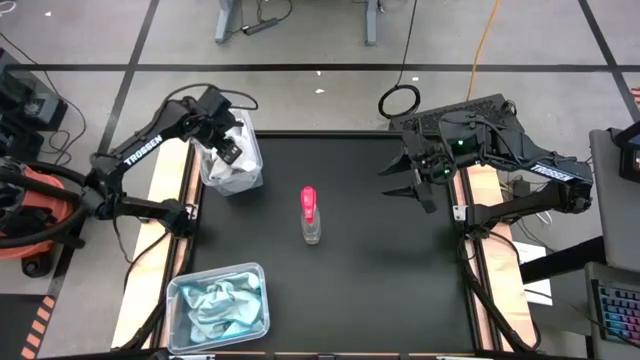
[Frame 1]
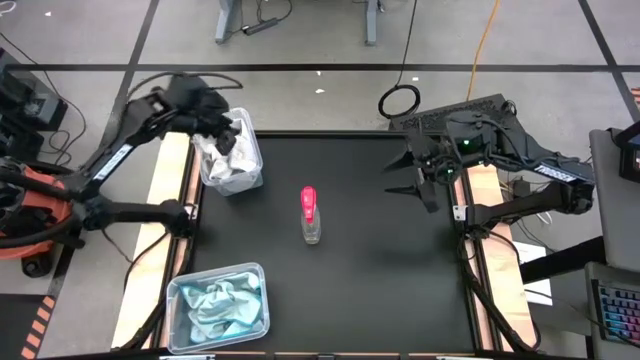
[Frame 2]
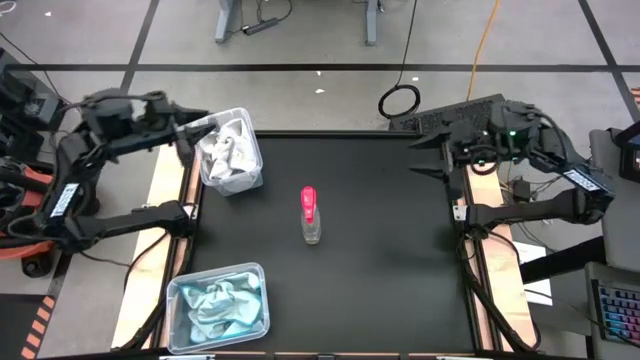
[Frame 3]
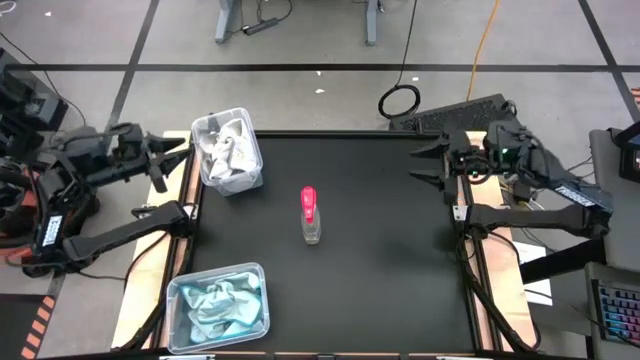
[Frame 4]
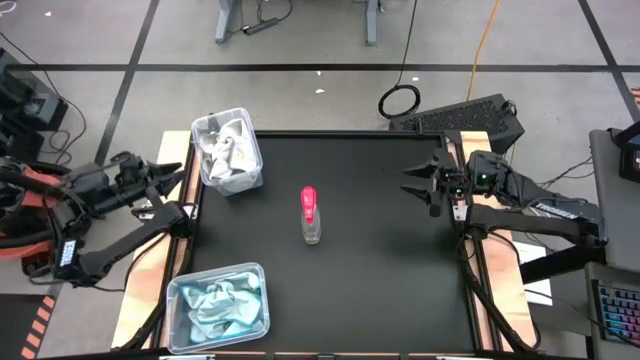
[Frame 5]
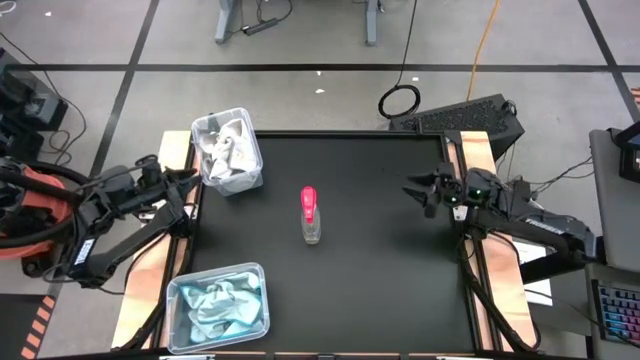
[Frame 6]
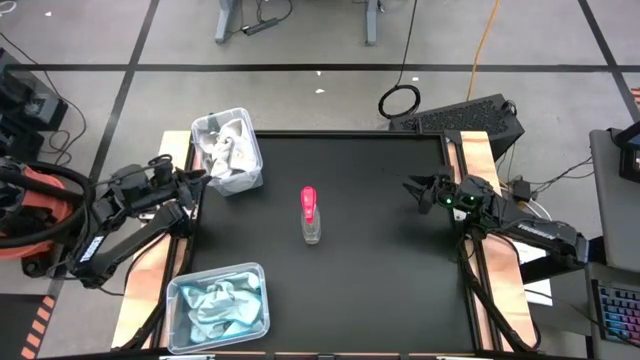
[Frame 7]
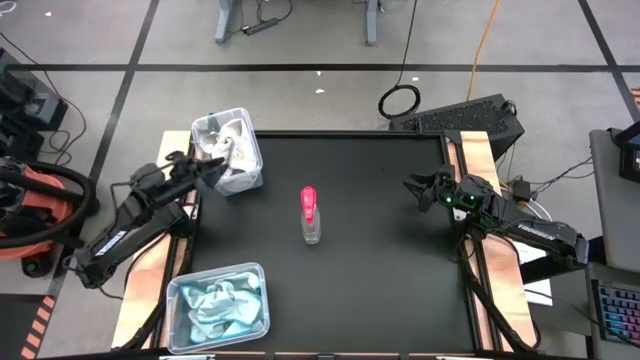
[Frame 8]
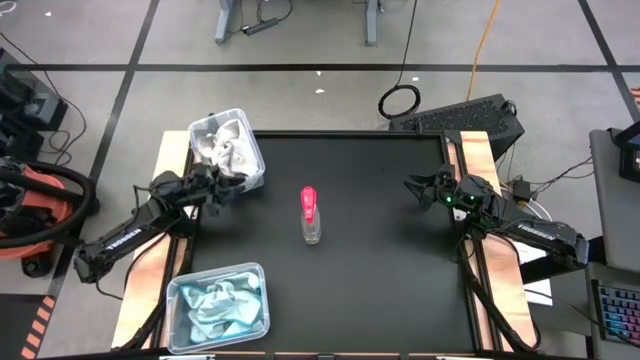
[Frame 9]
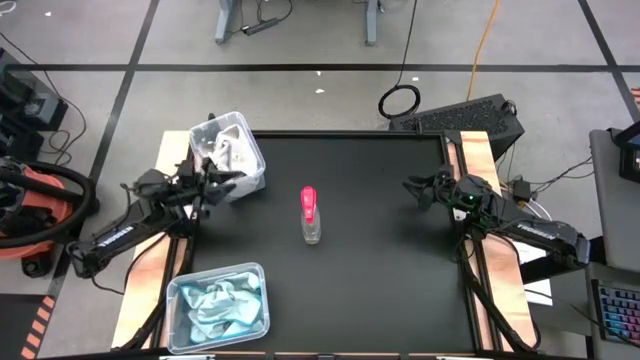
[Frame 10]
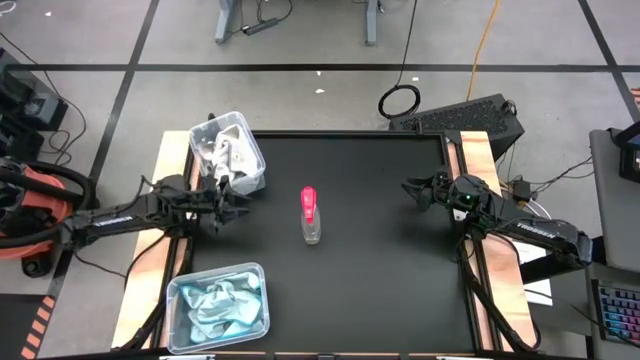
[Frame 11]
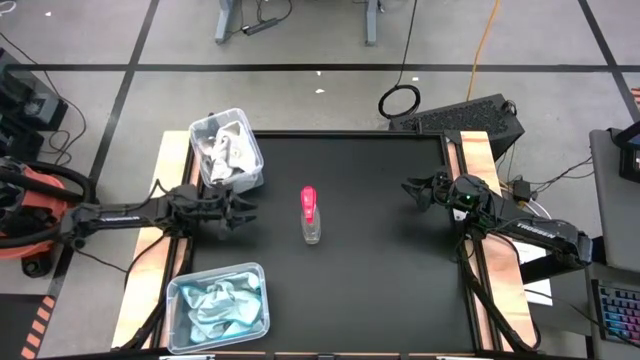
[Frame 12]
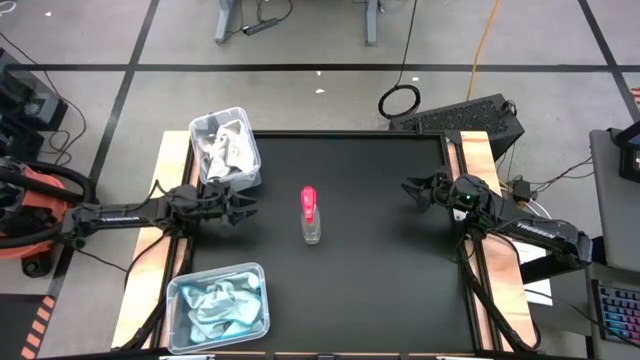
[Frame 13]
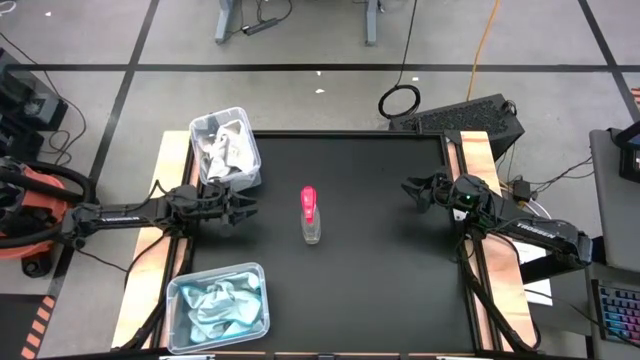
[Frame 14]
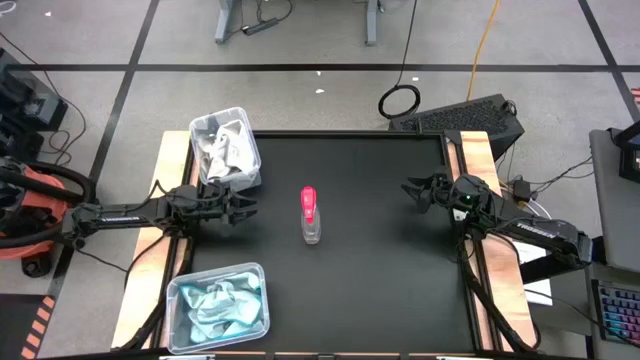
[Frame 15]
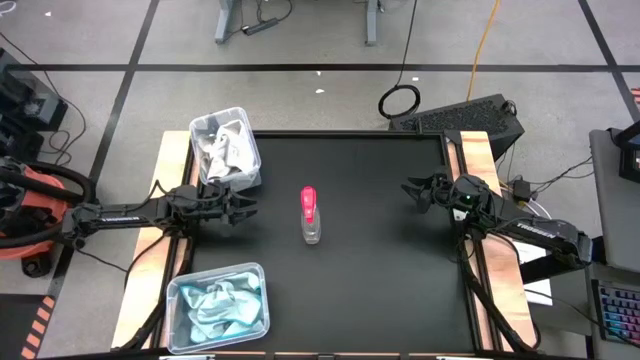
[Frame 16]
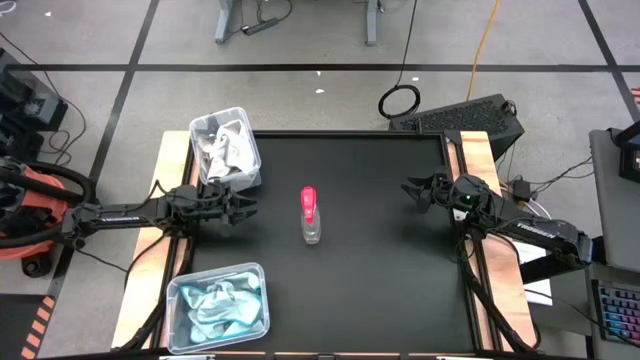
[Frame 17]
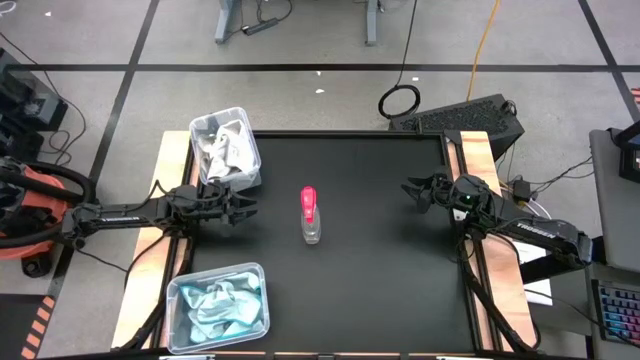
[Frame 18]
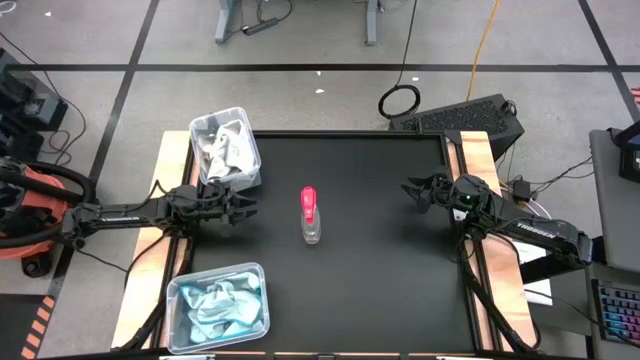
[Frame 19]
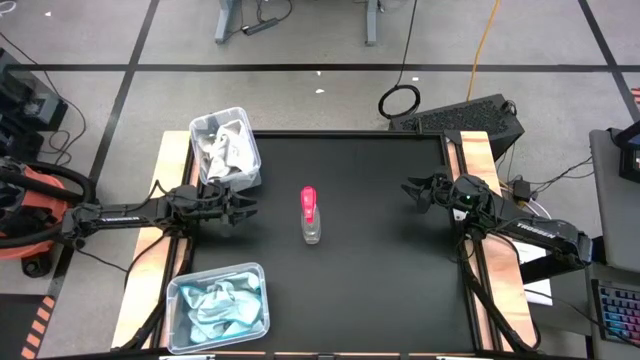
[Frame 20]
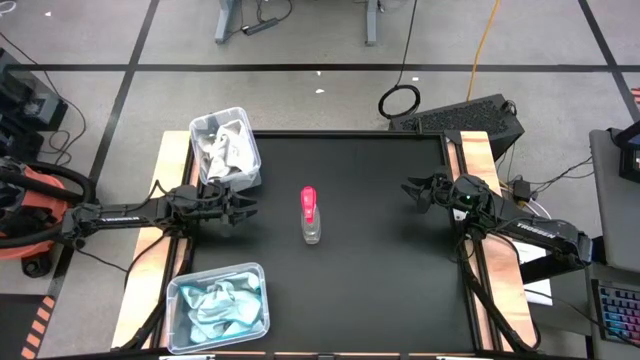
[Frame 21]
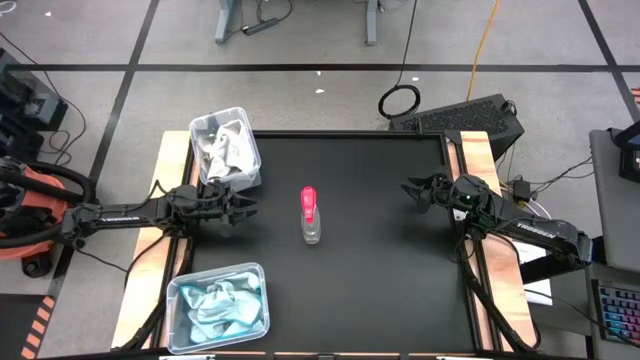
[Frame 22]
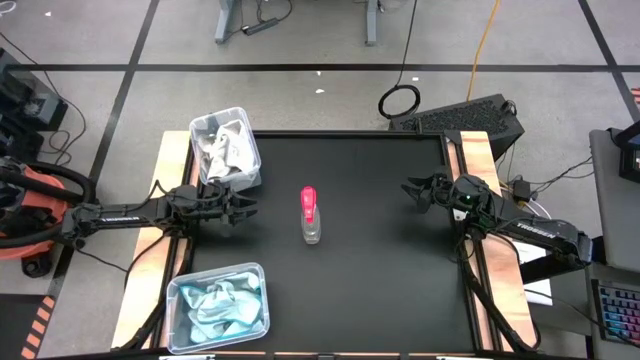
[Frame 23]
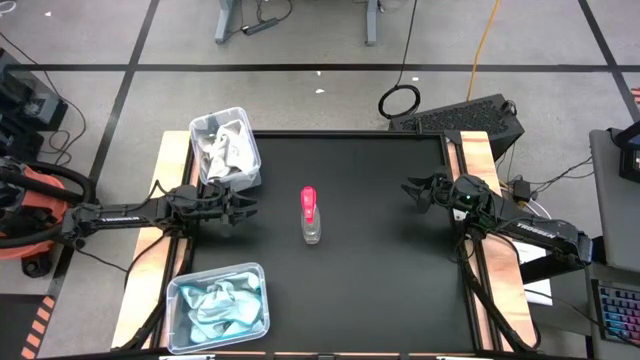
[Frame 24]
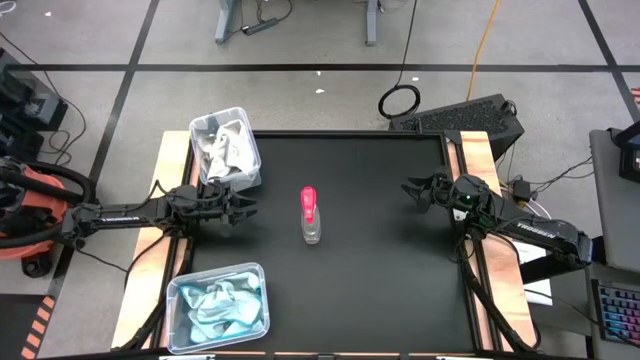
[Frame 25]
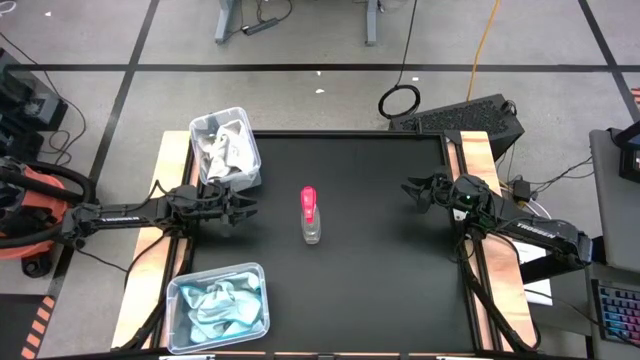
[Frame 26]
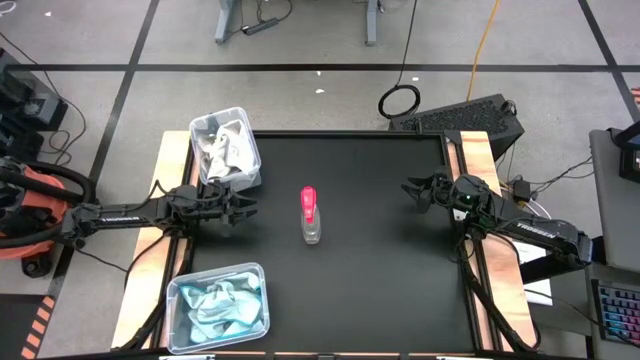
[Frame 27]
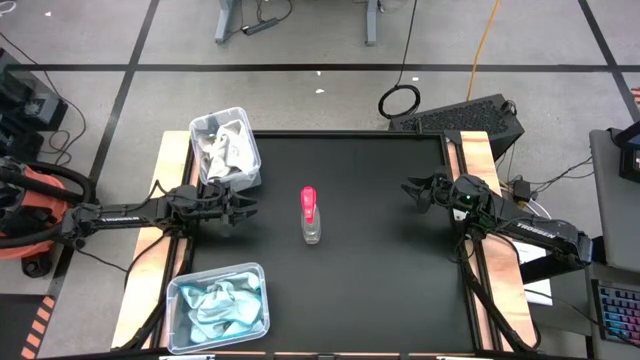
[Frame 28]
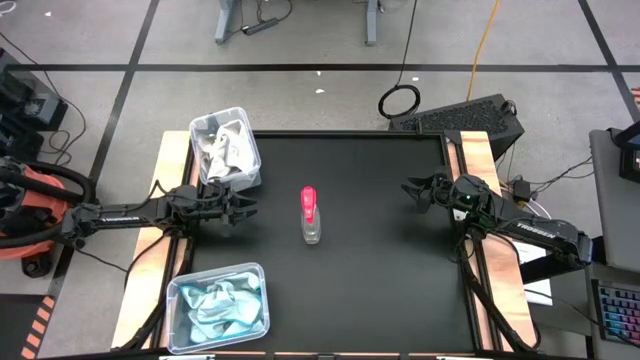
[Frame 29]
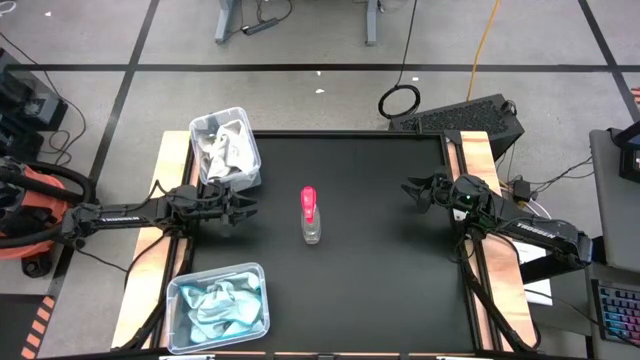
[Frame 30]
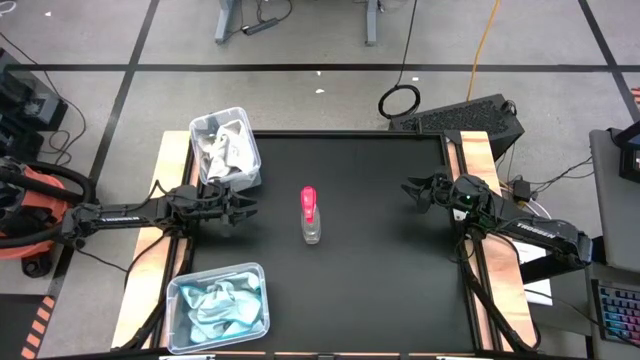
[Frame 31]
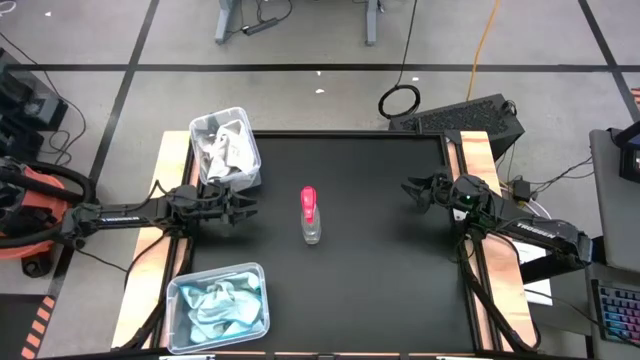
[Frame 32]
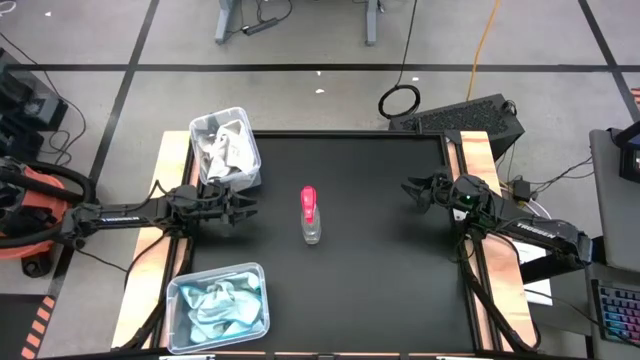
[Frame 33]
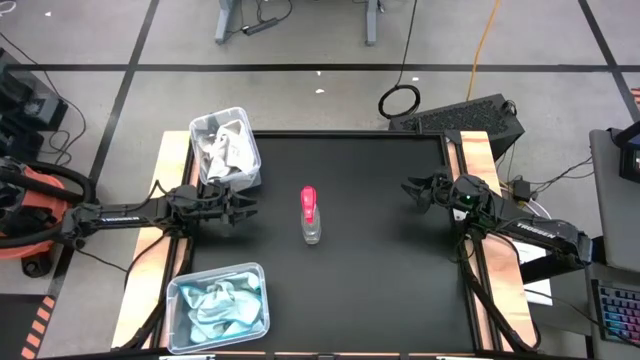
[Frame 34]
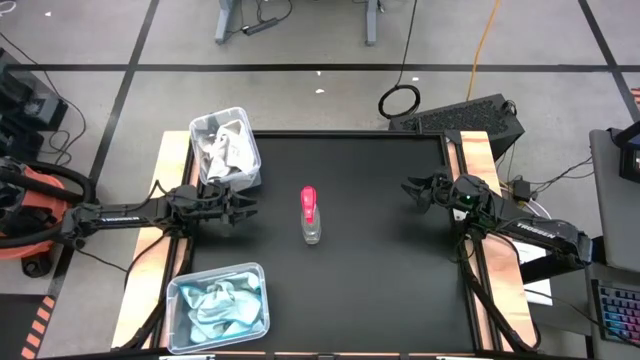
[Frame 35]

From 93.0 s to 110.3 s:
Task: Sort microfiber towel by color & place in baskets
Return to Home Position

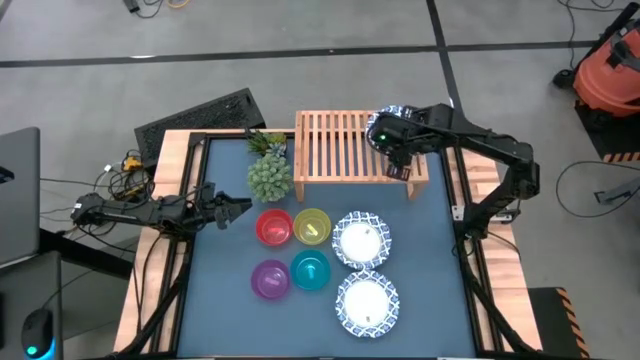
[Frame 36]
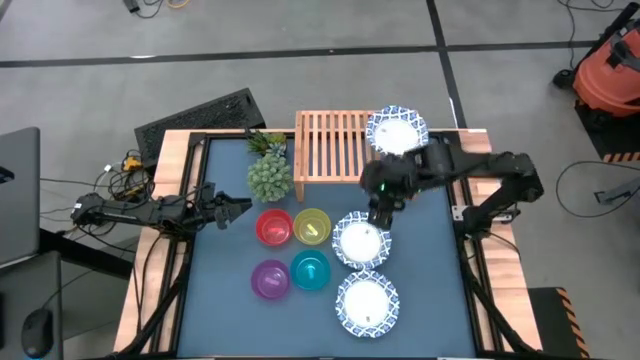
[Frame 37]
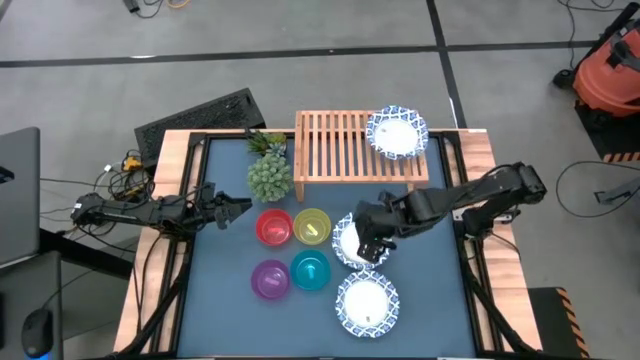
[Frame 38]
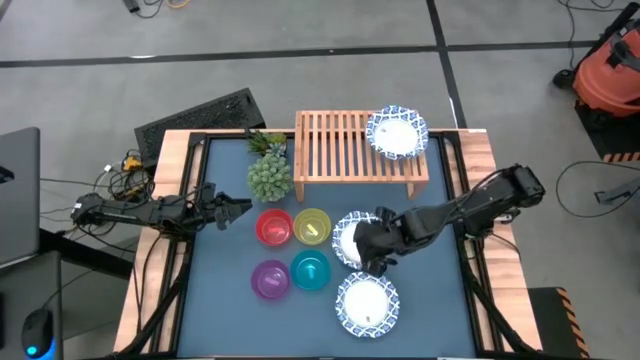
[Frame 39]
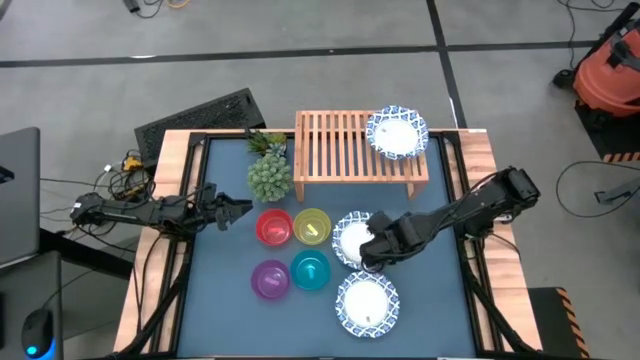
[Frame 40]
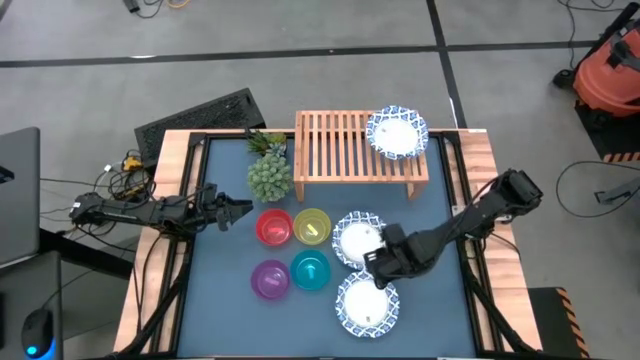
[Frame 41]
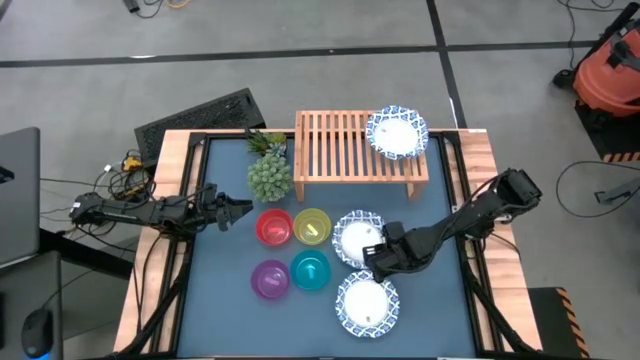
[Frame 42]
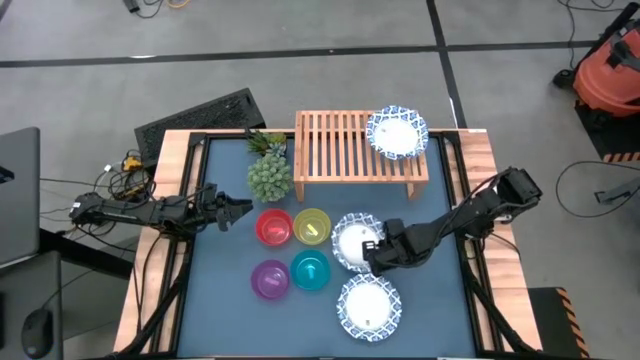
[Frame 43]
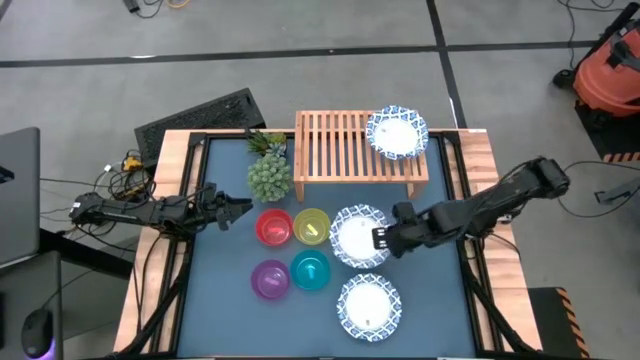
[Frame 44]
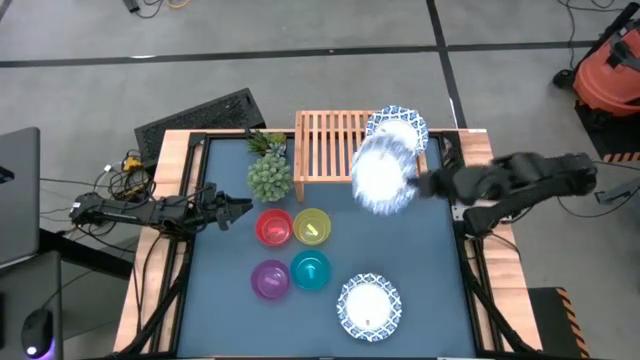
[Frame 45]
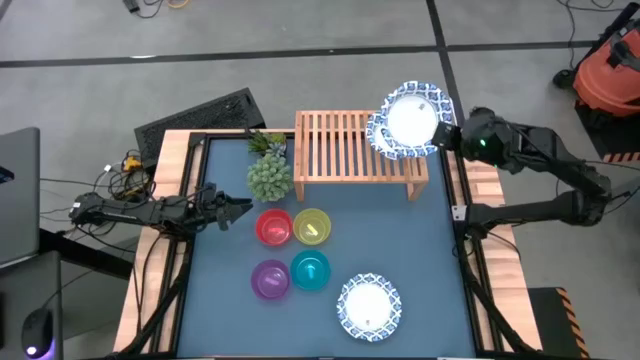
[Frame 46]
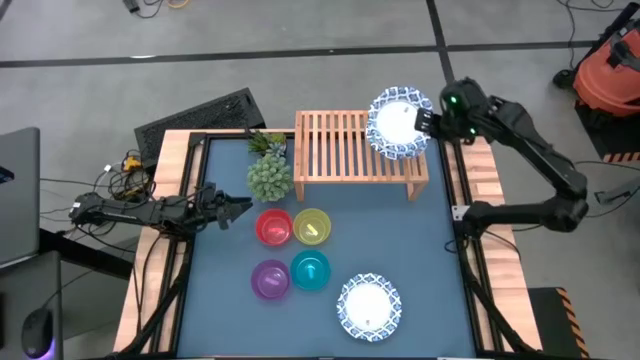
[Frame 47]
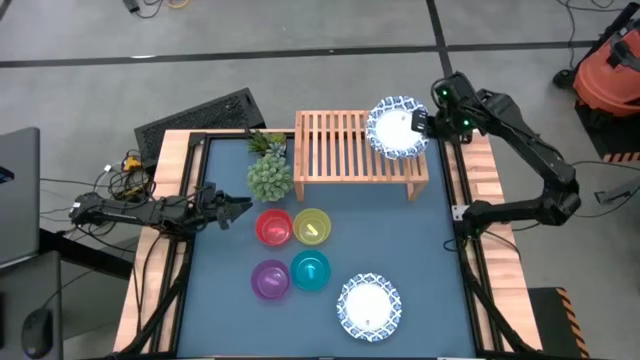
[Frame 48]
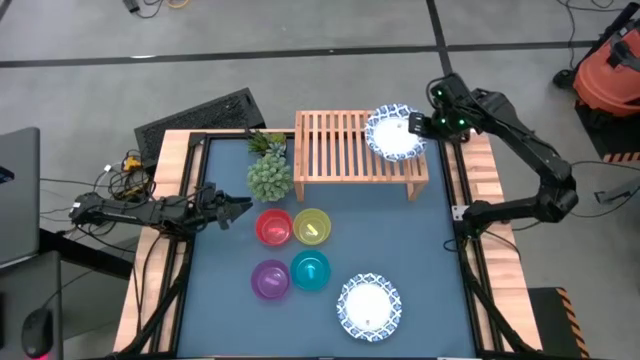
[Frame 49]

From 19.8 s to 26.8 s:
Task: Place and stack bowls onto a shelf
Stack the white patterned bowl on top of the white patterned bowl on the shelf
